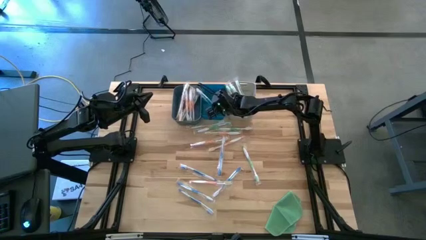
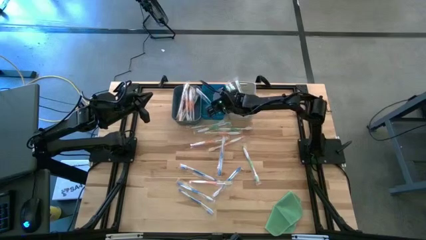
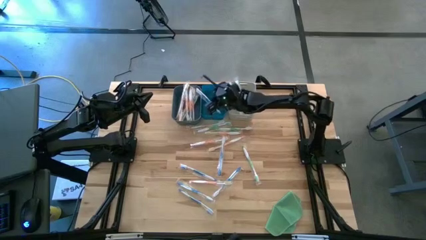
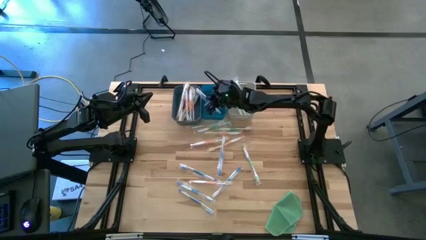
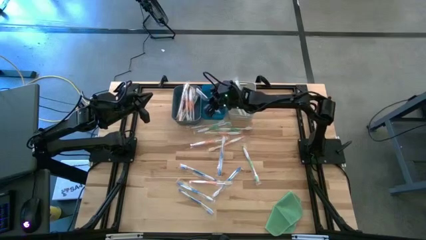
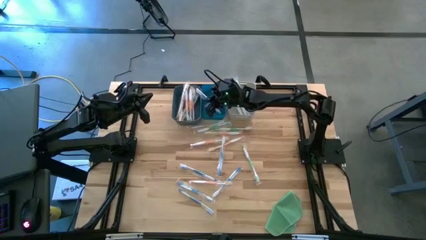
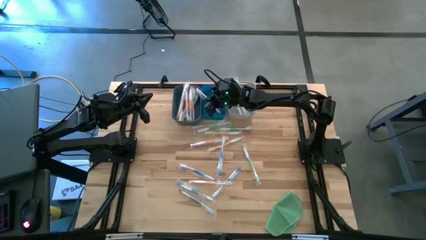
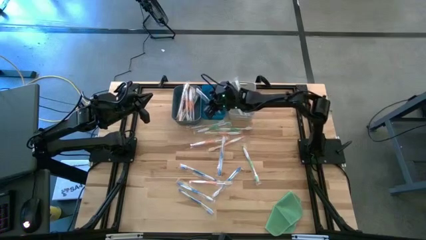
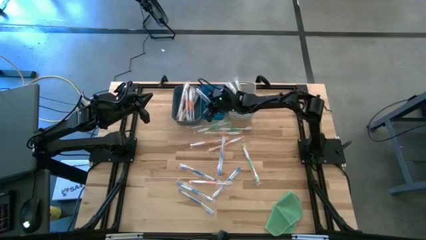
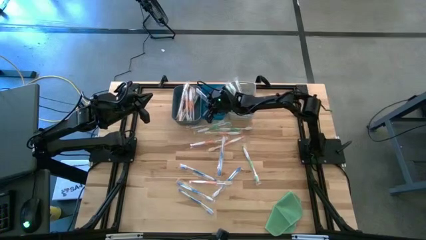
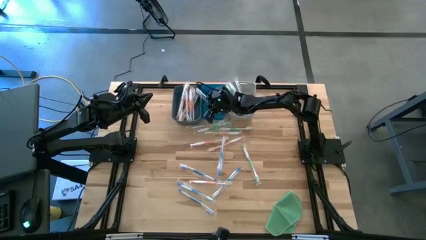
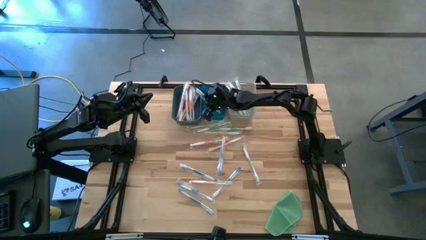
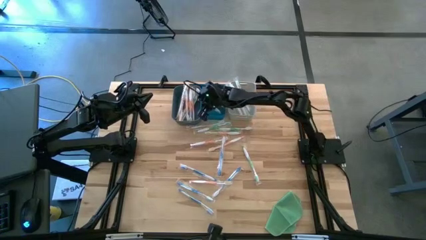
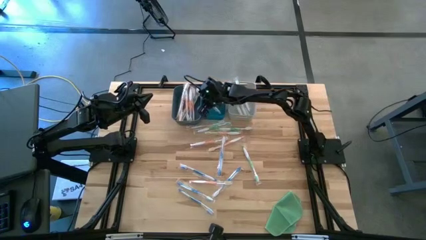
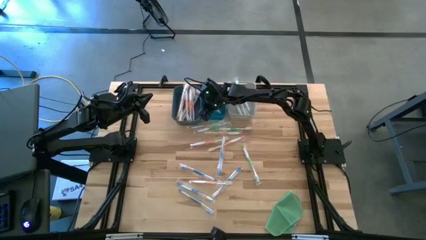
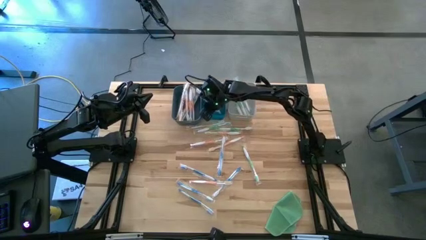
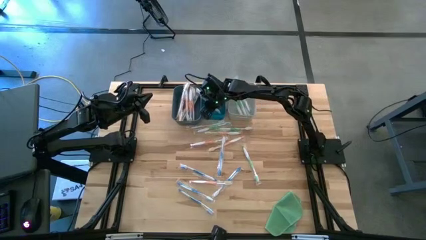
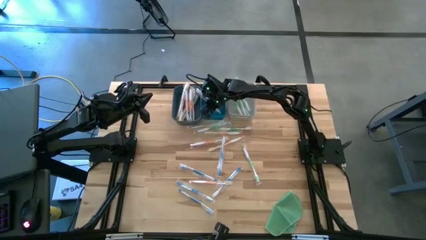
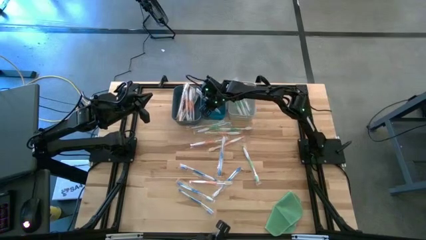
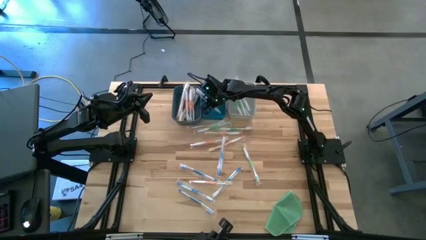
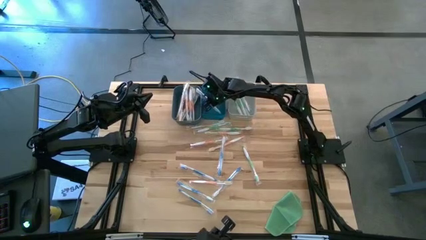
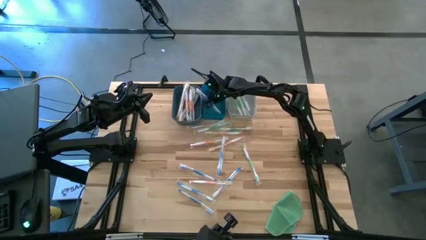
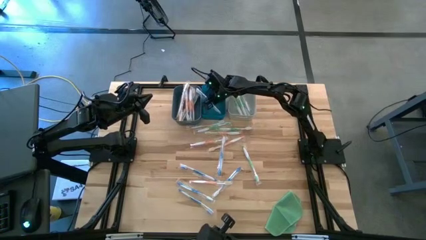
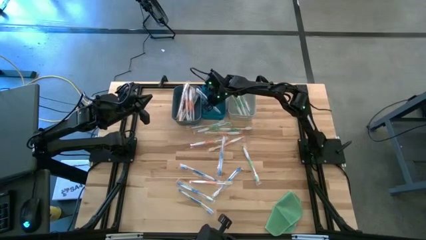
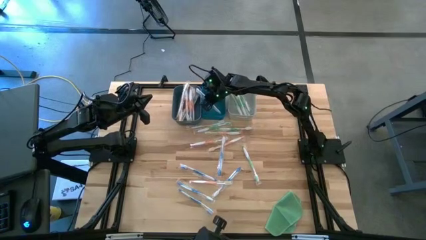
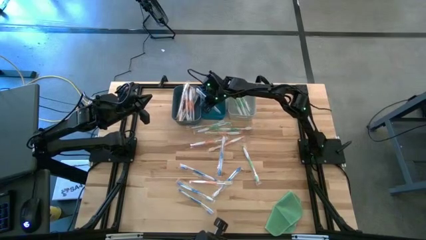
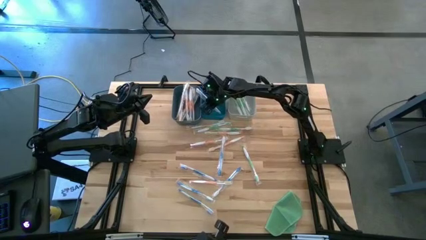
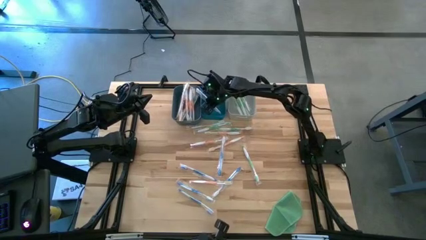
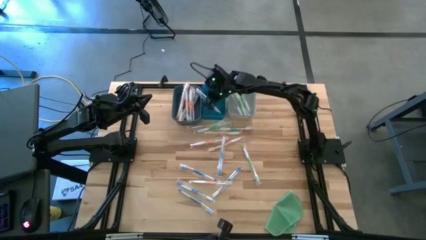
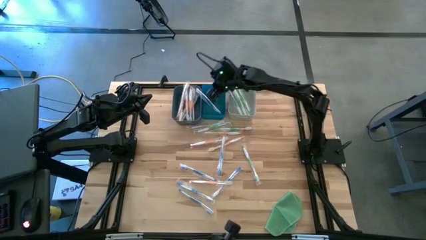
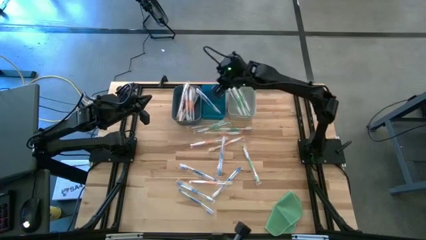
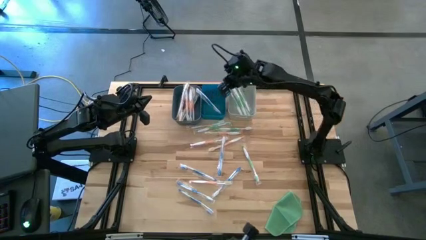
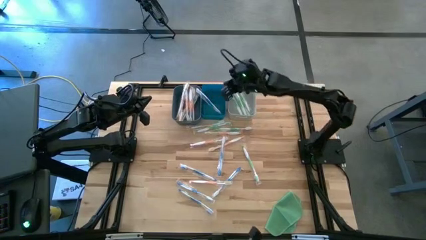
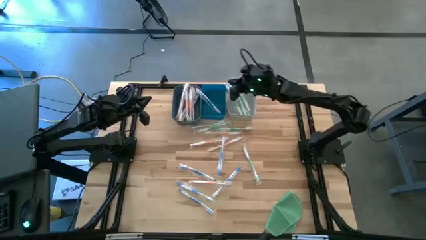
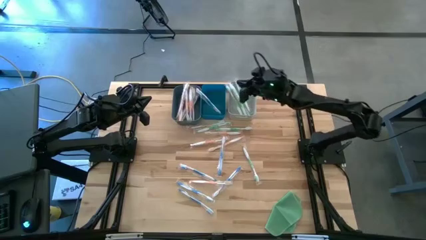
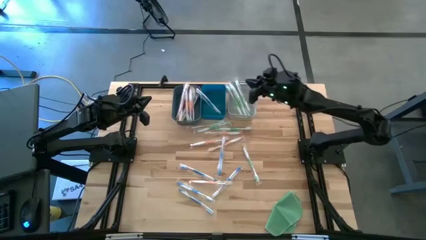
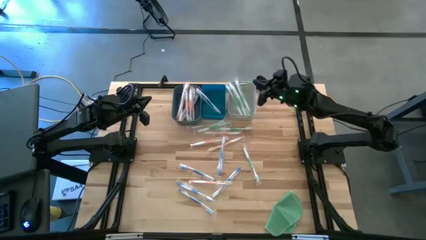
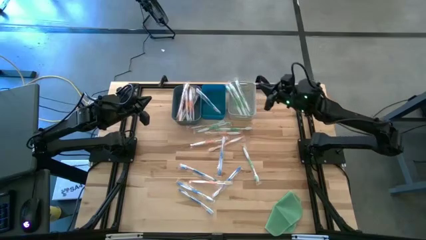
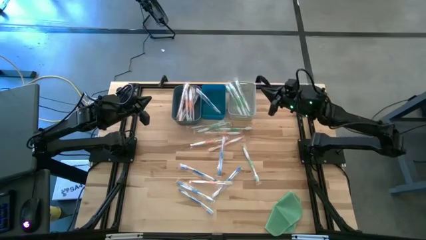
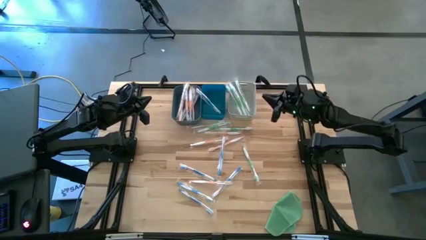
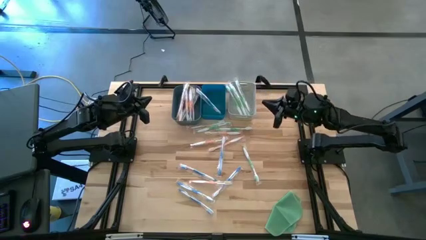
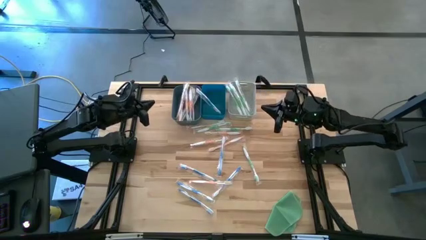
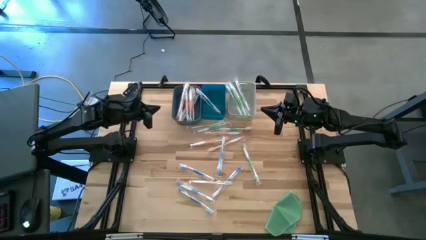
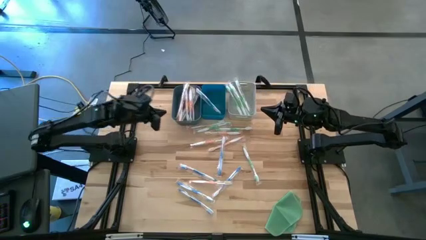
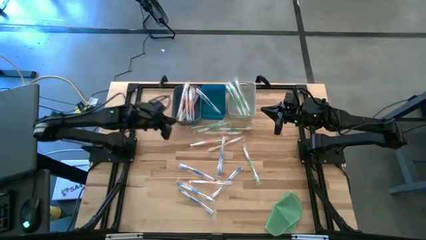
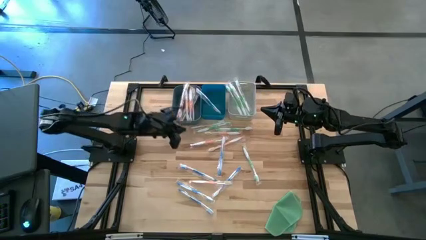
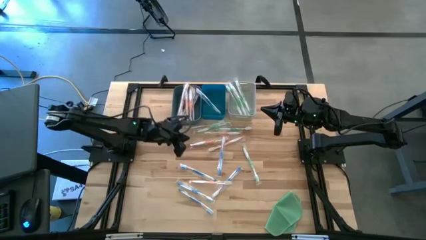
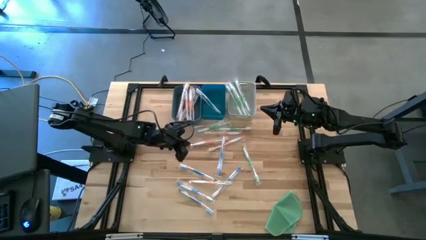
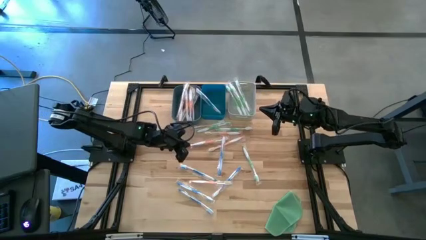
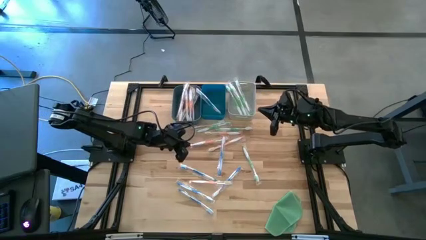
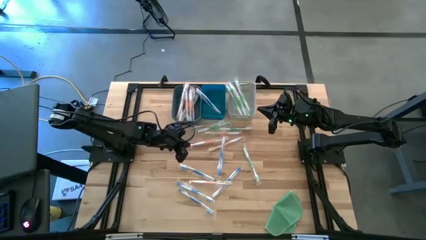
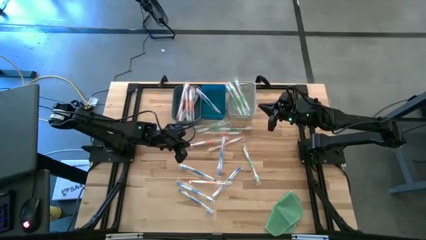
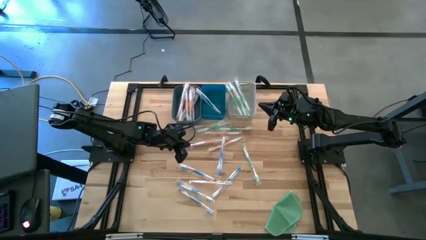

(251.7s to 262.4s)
Task: Pick & Place Toothbrushes
Put the blue toothbrush into the blue bin

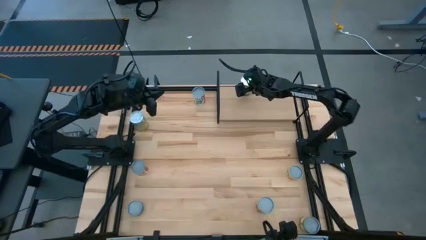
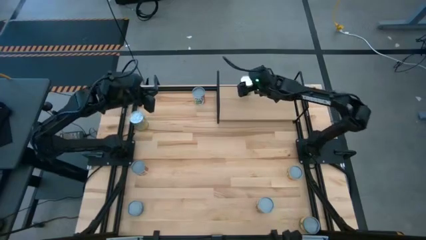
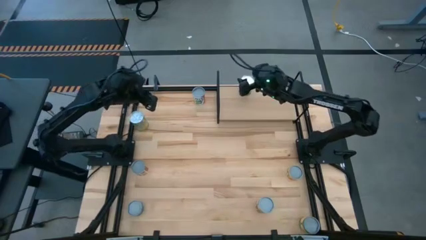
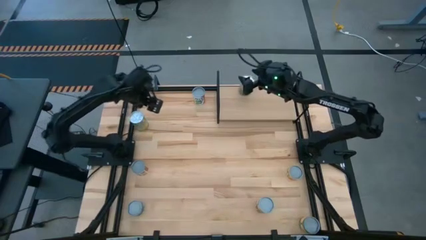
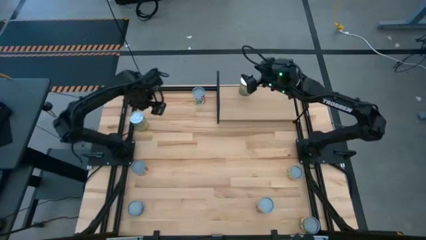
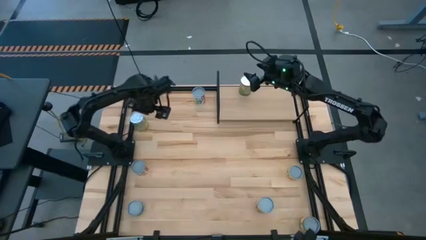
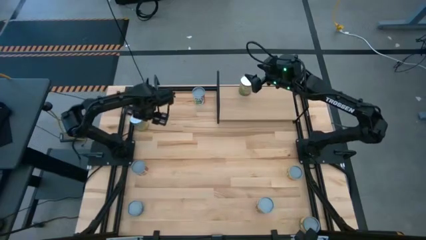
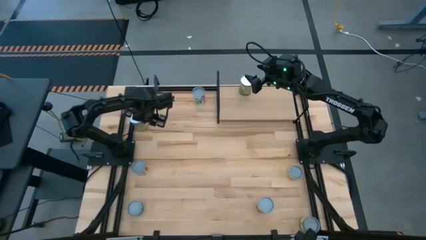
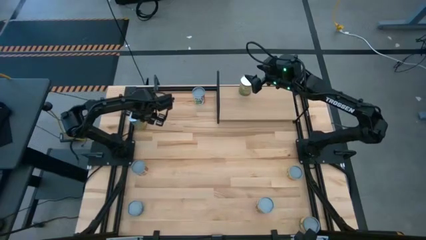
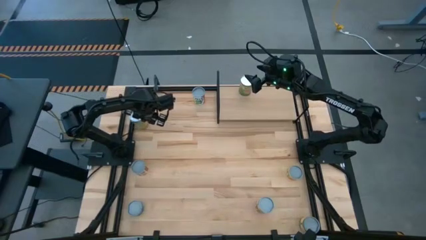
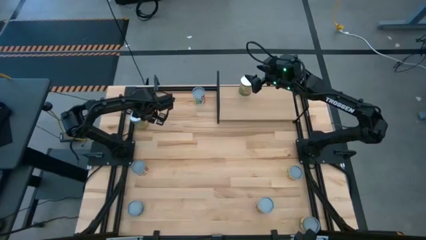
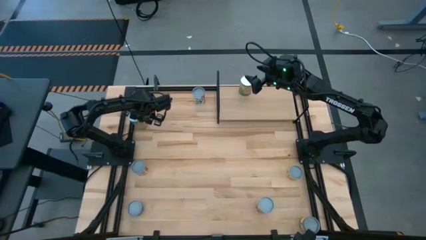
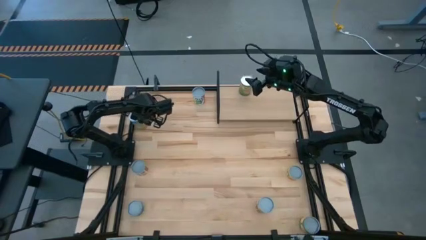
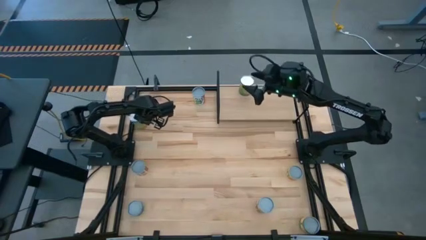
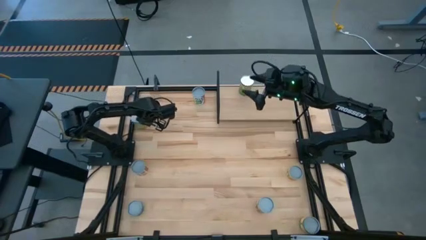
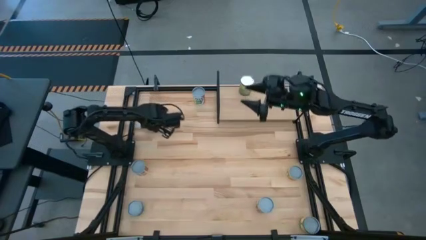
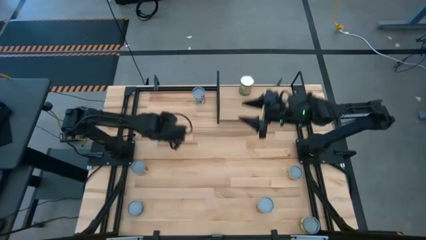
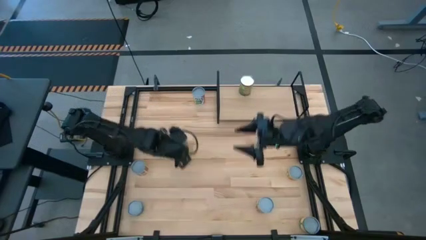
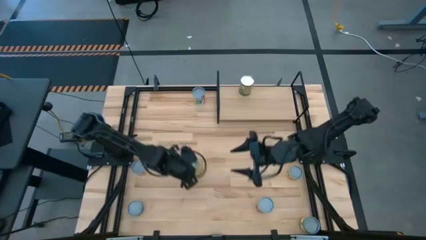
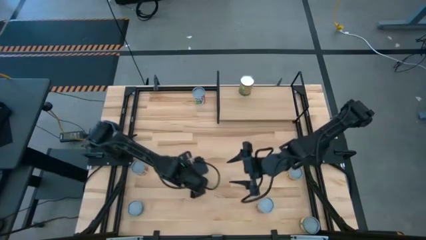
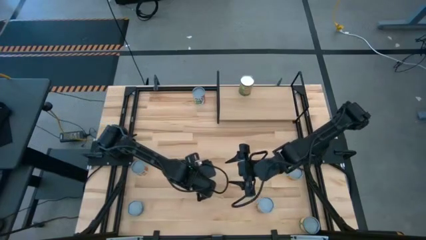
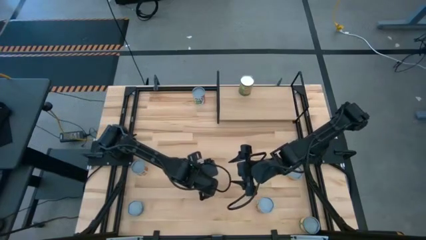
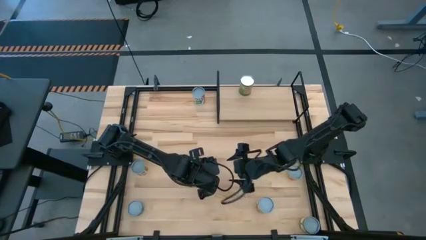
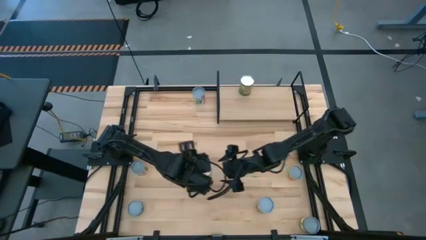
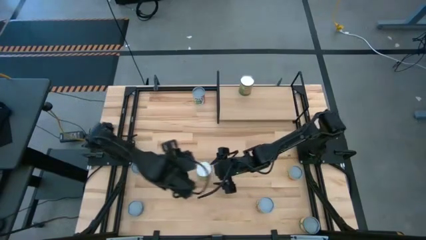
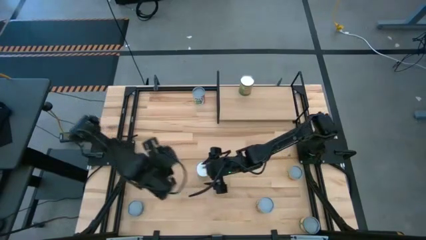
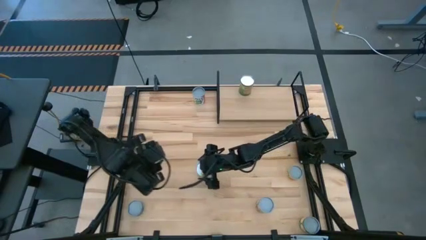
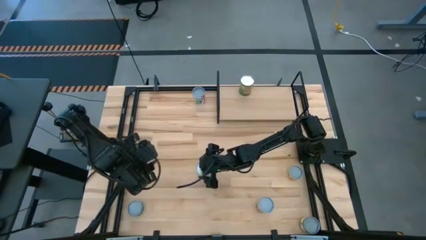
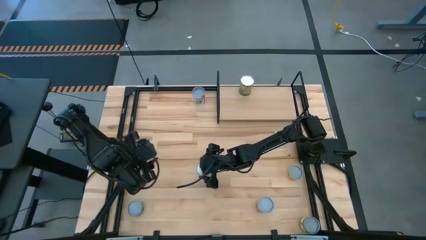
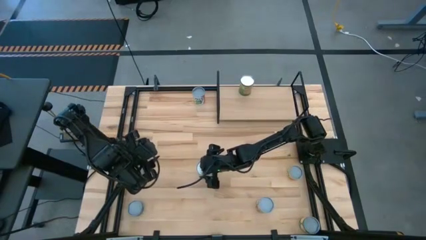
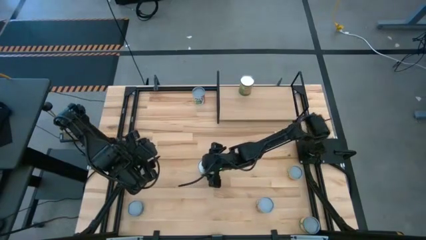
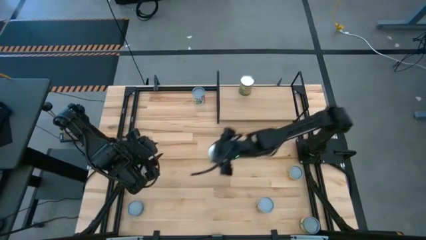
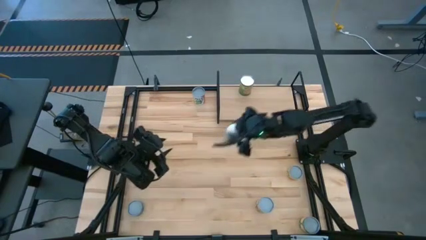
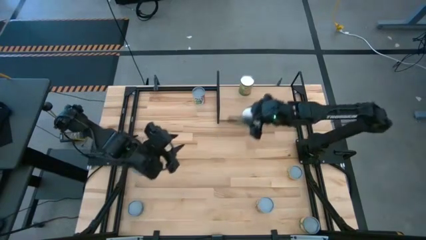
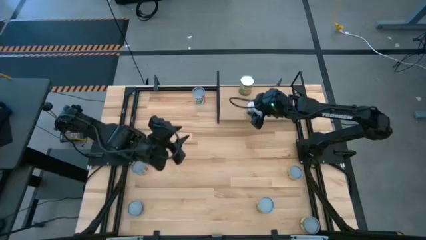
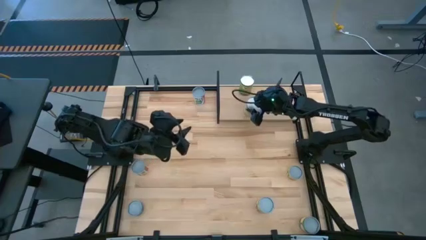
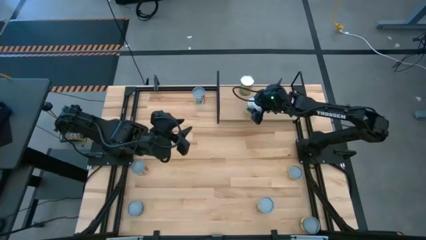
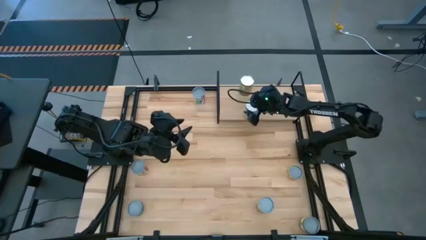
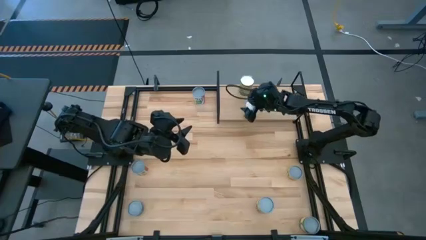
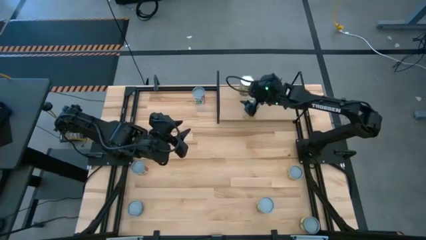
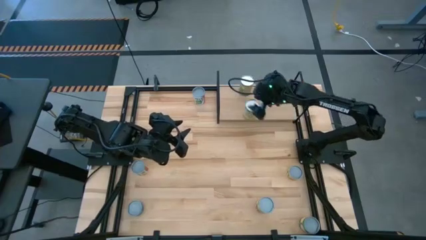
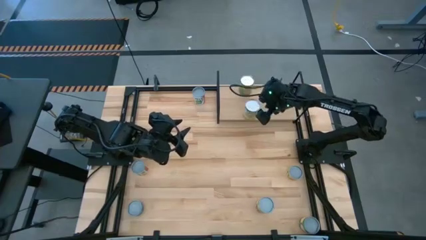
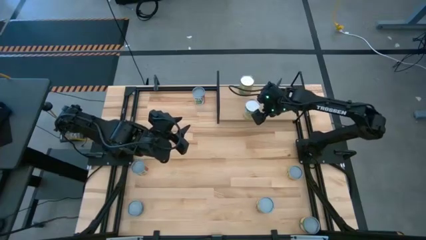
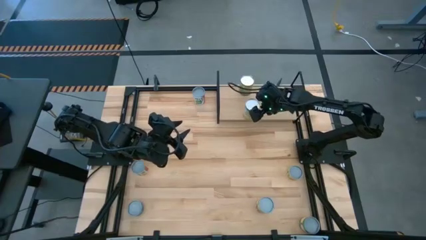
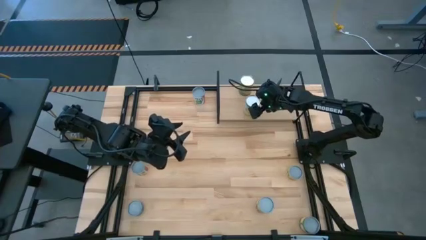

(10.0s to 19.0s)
Task: Pick and place cans onto a shelf
Put the blue/yellow can on the shelf
